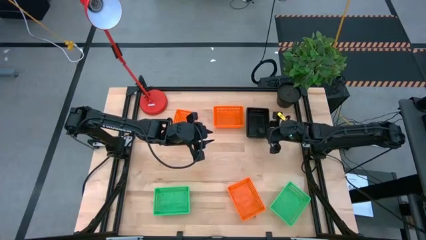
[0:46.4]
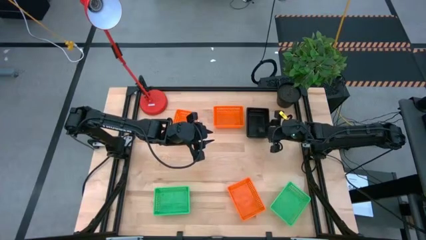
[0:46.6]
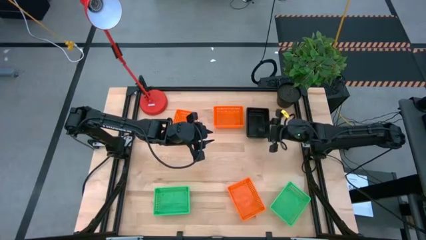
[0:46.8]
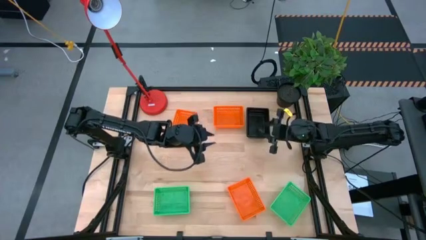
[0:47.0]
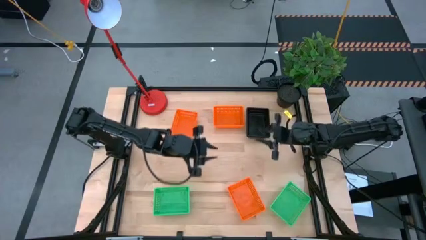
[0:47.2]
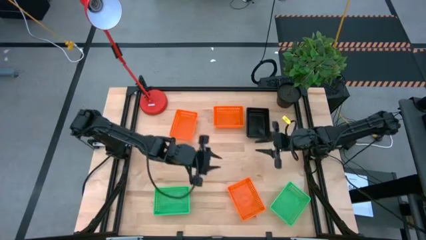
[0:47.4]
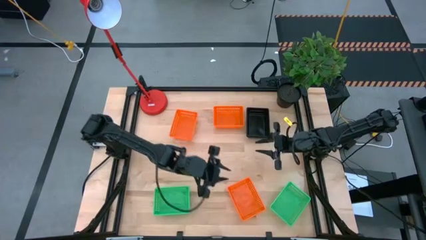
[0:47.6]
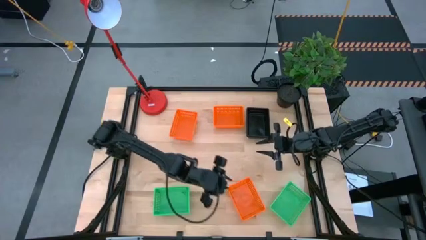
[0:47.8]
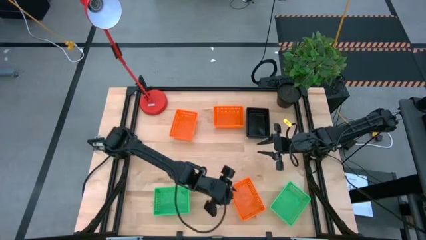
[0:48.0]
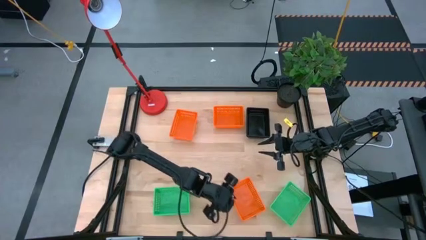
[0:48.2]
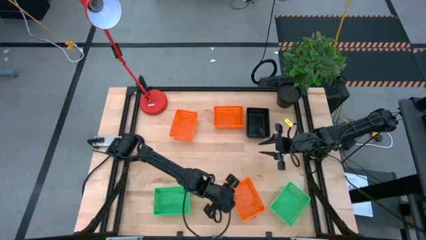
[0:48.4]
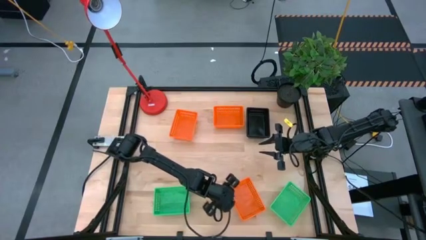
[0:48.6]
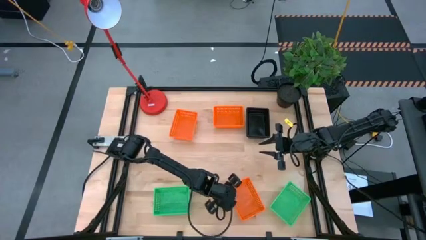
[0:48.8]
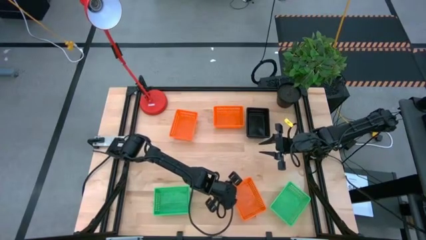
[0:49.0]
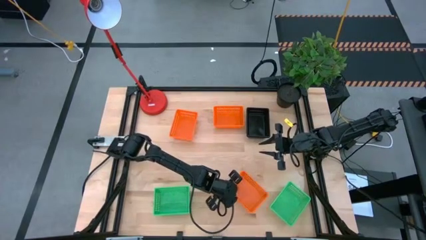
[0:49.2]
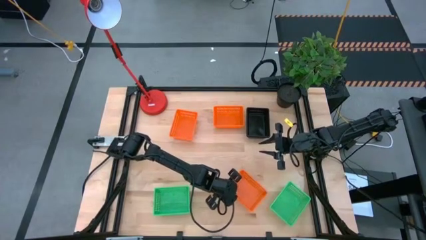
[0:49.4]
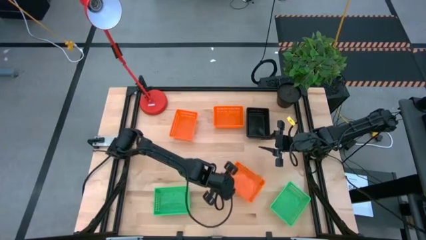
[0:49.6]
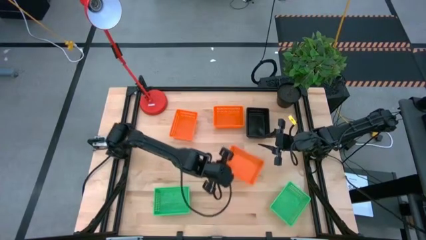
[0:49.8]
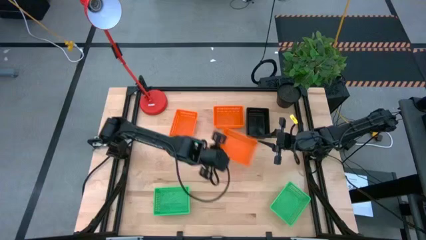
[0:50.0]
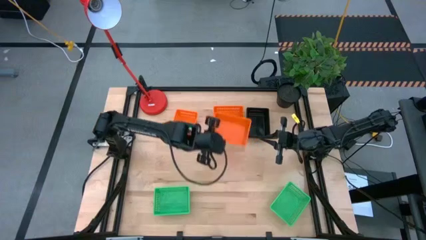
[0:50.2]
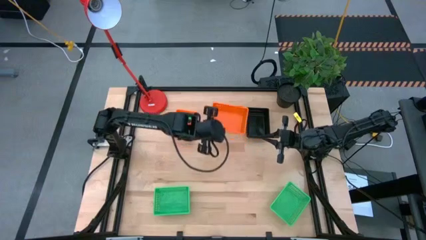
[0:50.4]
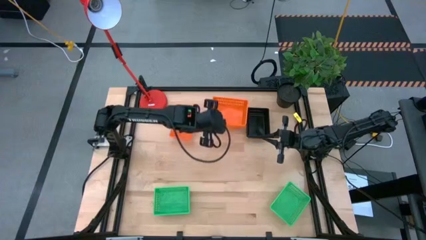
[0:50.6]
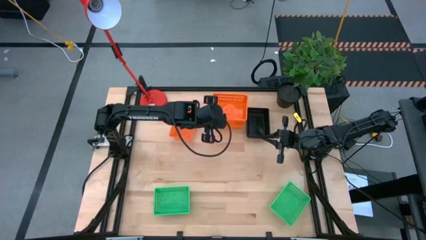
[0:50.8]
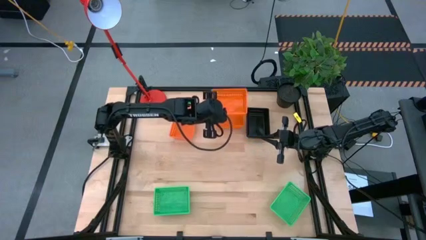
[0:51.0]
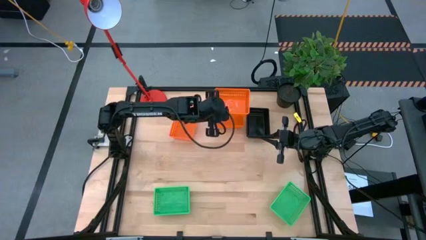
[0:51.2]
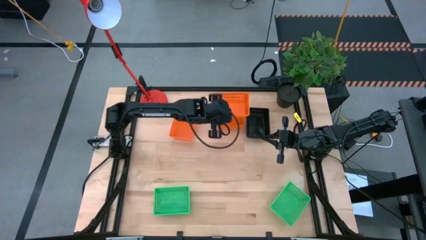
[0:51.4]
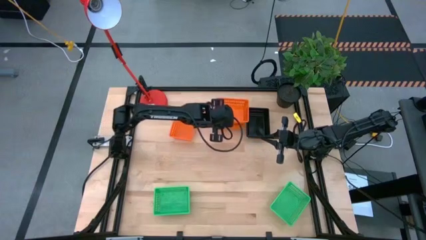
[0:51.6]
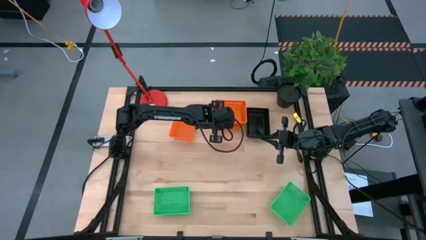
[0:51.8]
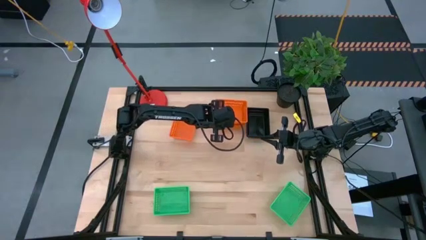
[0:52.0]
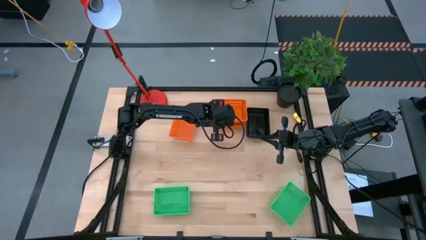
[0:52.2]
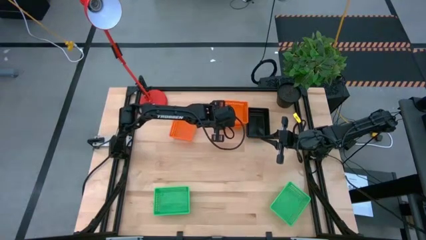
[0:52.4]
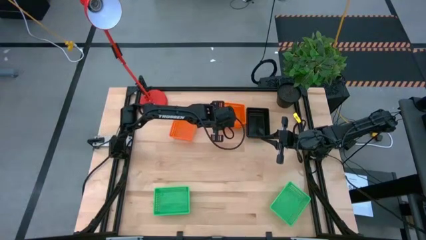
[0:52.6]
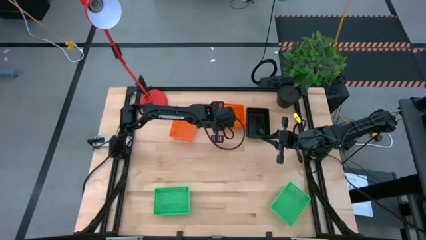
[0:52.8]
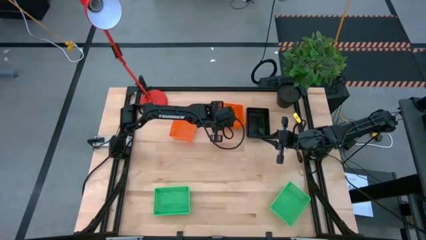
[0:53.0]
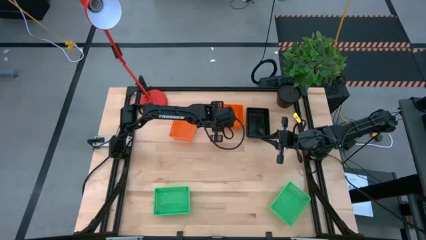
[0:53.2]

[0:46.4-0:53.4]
Stack the bottom orange basket on top of the right orange basket

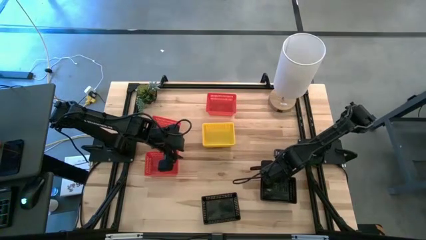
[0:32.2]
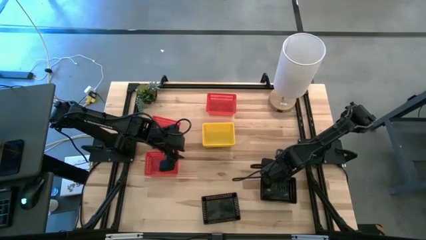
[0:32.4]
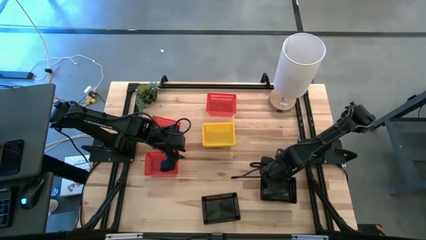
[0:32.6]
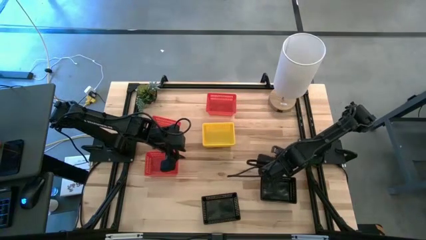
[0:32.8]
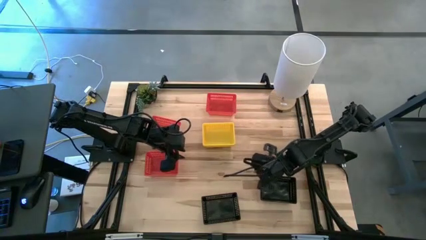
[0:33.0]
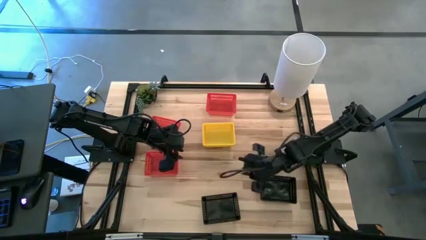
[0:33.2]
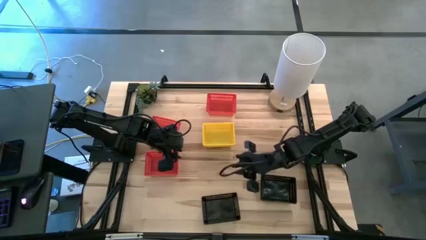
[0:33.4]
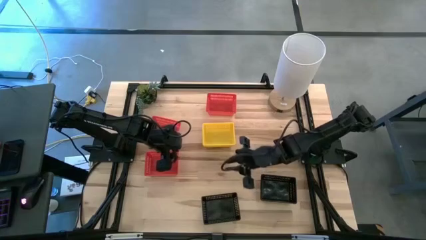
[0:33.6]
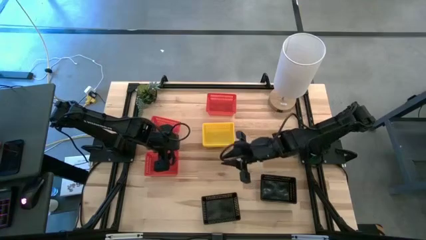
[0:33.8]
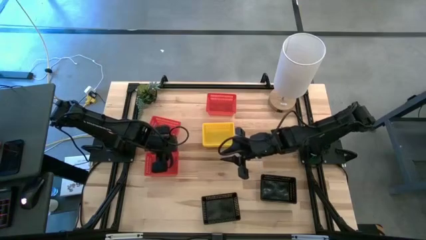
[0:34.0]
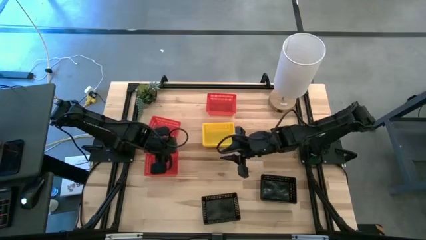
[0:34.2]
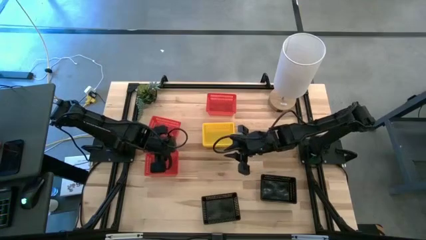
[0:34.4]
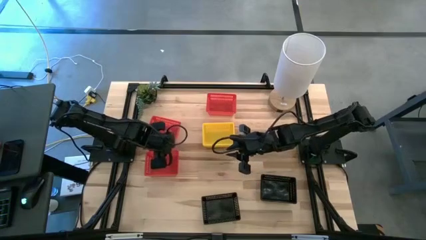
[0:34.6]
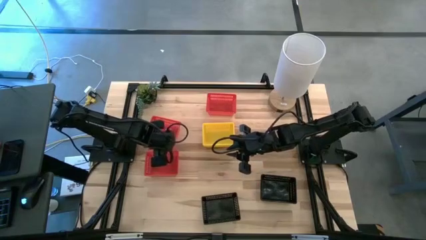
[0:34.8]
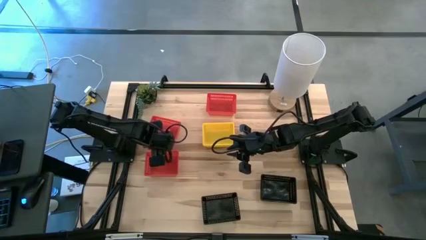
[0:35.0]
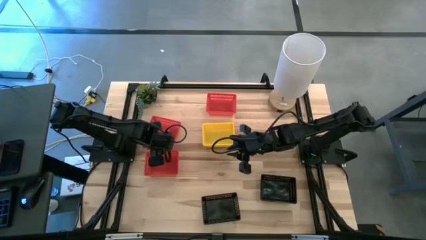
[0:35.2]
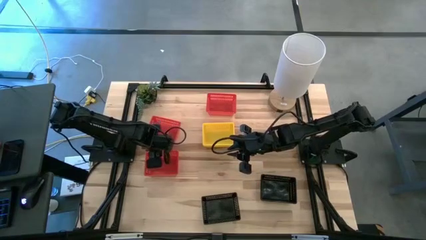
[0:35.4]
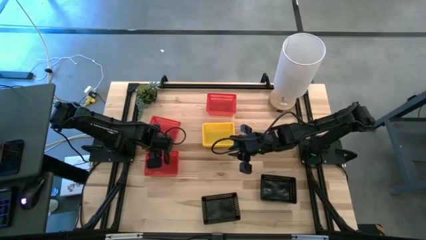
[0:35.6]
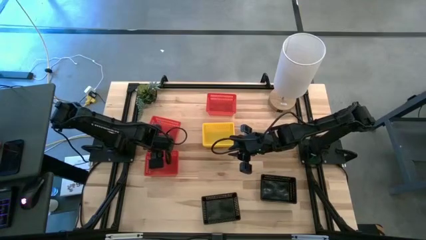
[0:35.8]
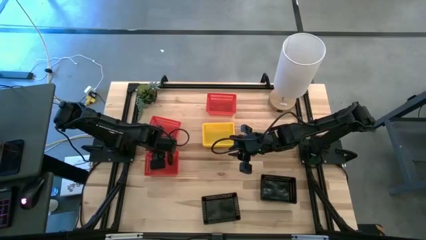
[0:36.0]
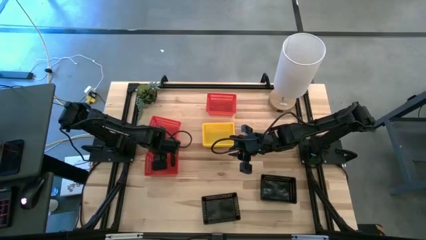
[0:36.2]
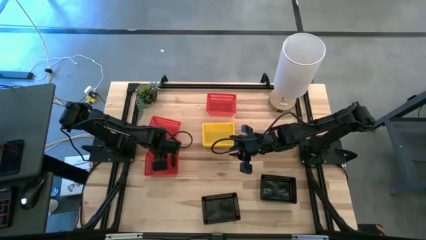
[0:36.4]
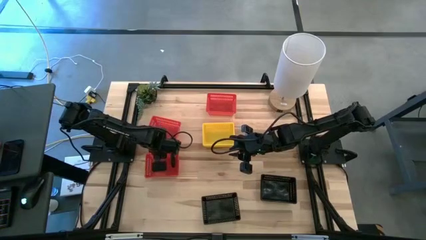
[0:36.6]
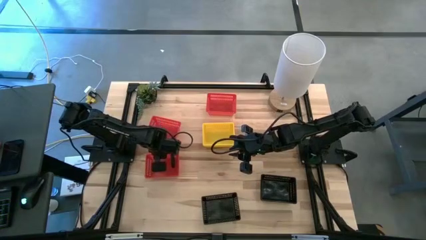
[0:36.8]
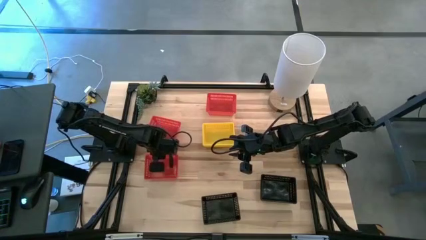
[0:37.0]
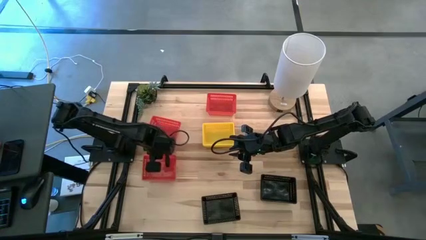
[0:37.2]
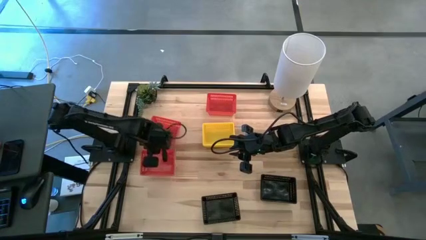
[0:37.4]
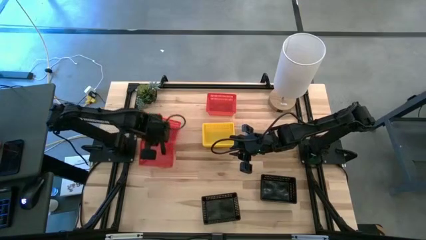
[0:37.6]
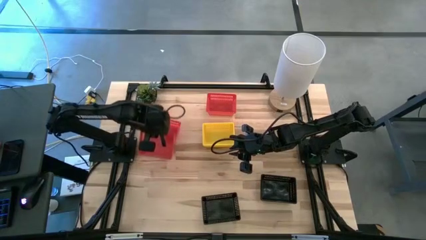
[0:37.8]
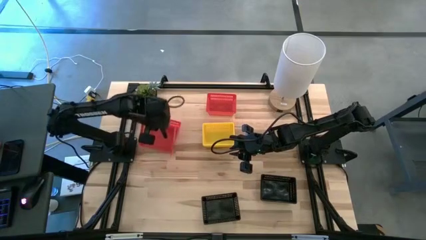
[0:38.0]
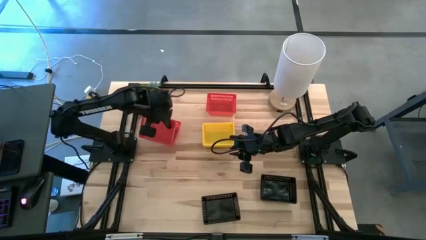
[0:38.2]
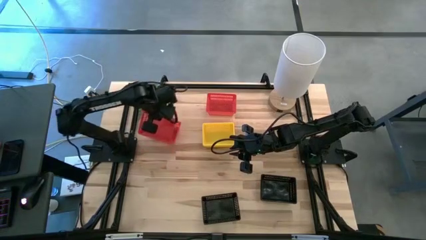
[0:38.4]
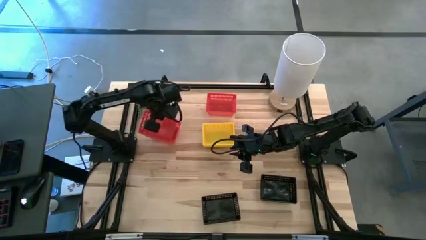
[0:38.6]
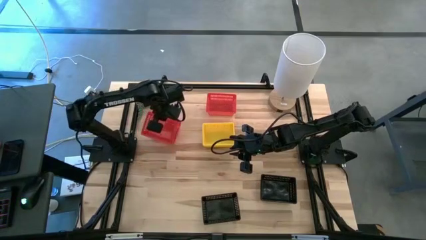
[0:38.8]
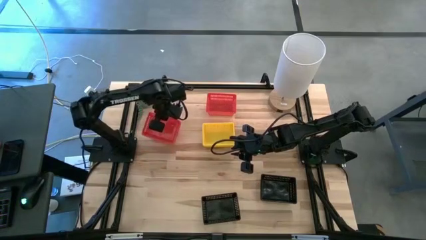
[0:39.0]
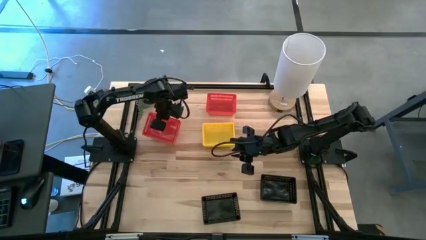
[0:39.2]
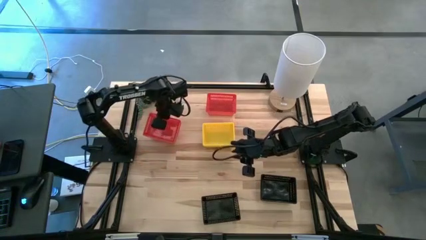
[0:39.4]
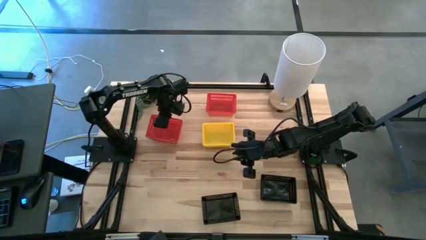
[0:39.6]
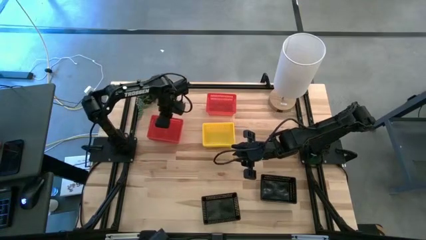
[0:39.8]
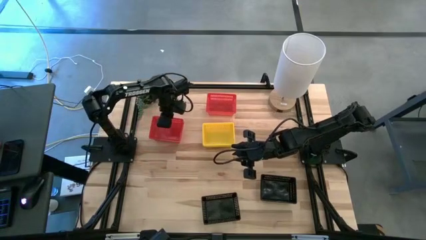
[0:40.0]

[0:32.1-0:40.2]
Stack the bottom red bin on the middle red bin
